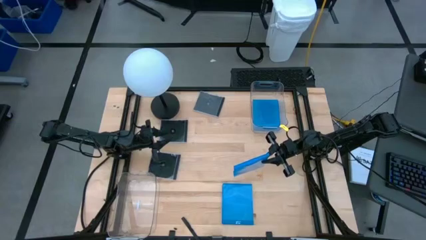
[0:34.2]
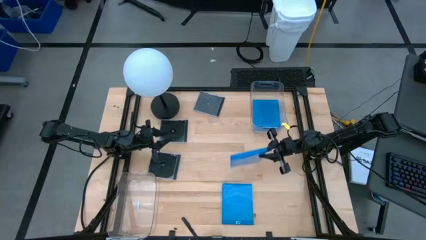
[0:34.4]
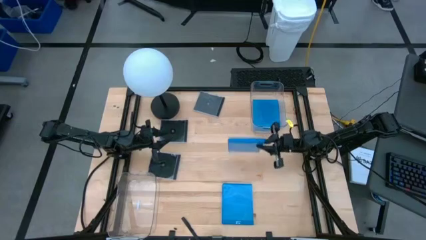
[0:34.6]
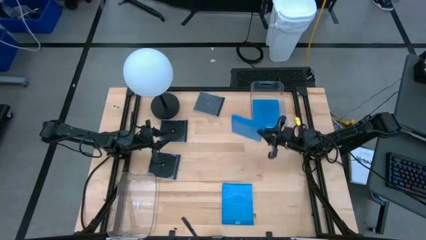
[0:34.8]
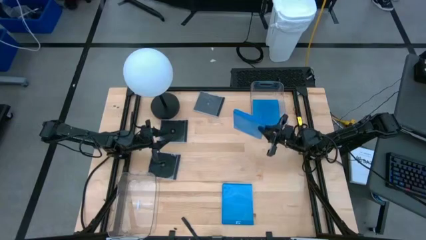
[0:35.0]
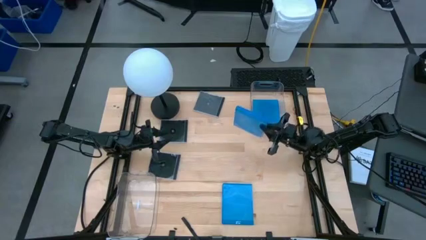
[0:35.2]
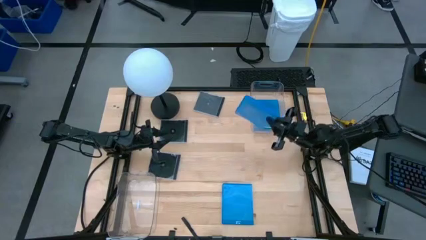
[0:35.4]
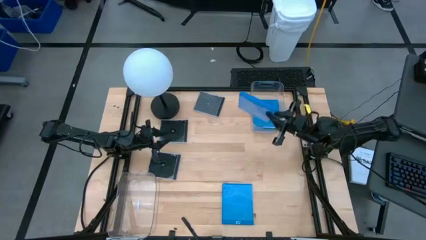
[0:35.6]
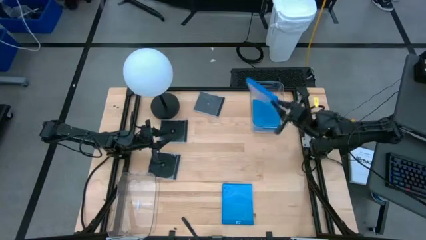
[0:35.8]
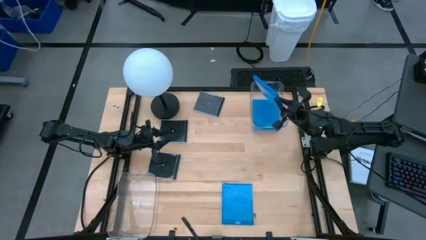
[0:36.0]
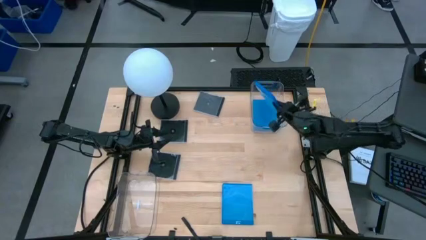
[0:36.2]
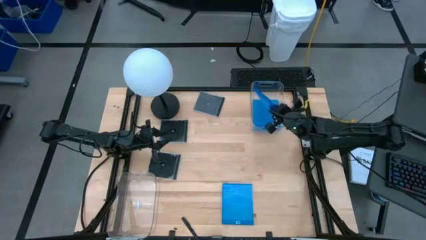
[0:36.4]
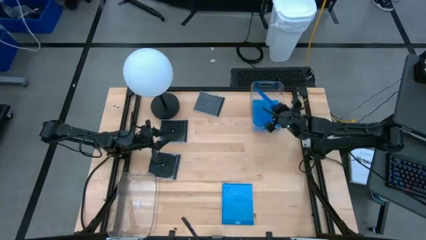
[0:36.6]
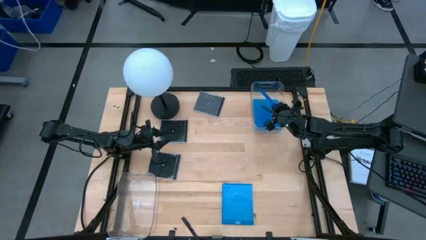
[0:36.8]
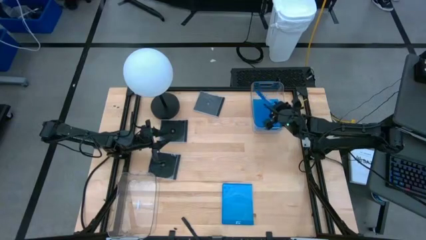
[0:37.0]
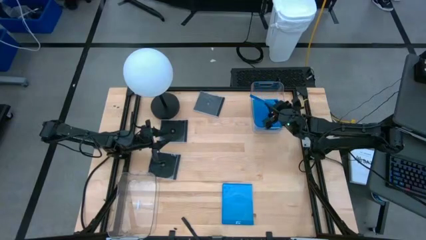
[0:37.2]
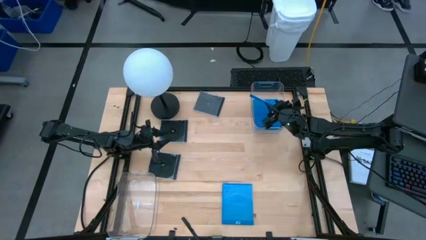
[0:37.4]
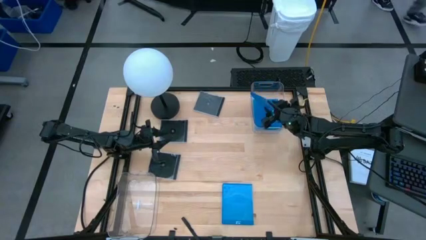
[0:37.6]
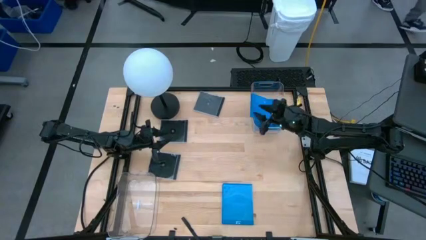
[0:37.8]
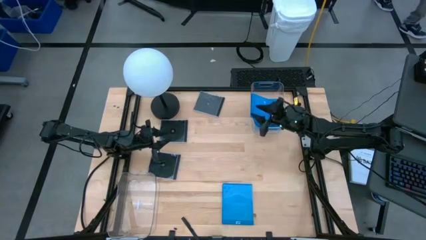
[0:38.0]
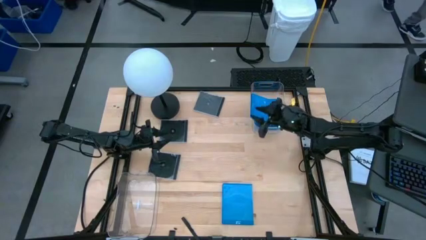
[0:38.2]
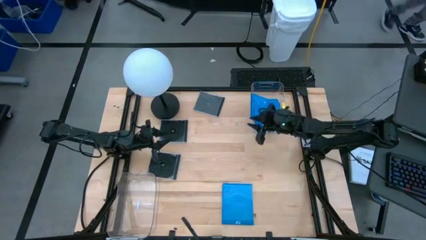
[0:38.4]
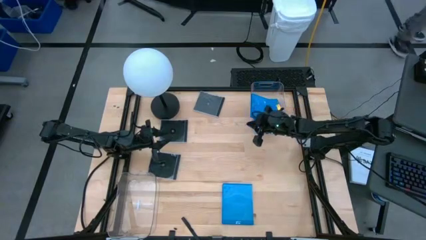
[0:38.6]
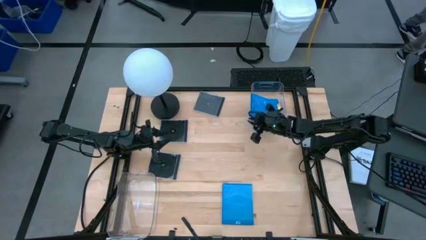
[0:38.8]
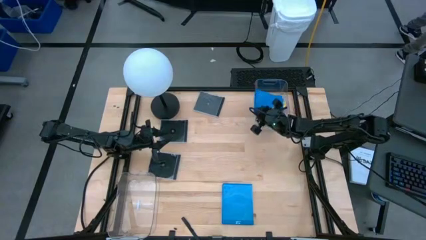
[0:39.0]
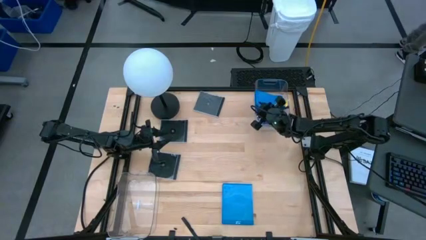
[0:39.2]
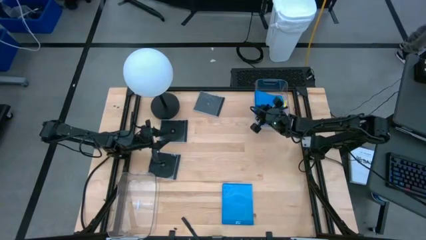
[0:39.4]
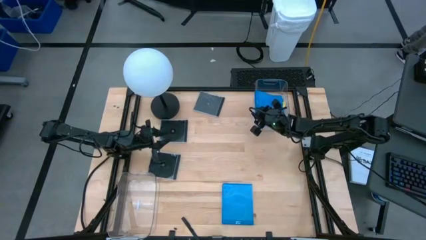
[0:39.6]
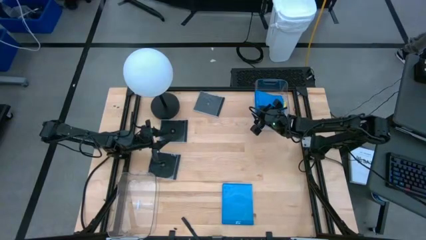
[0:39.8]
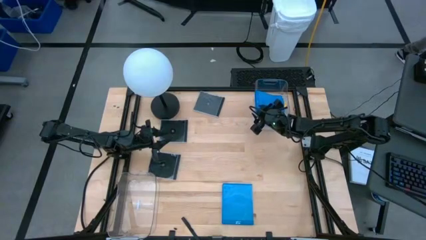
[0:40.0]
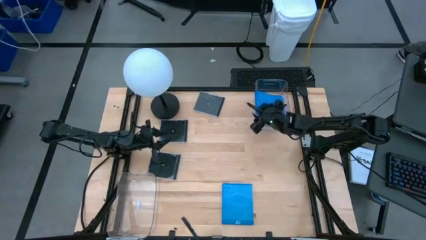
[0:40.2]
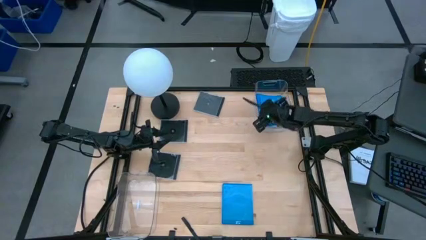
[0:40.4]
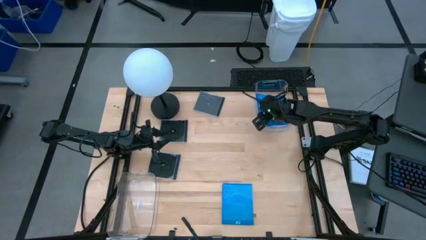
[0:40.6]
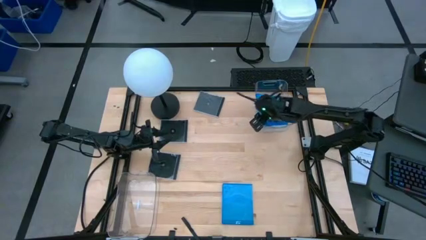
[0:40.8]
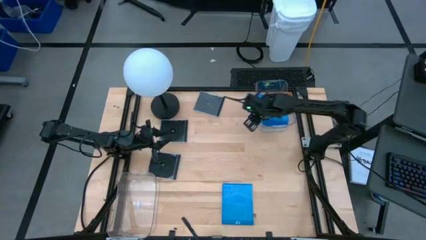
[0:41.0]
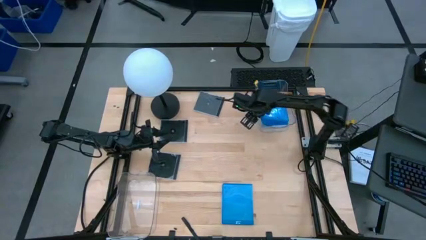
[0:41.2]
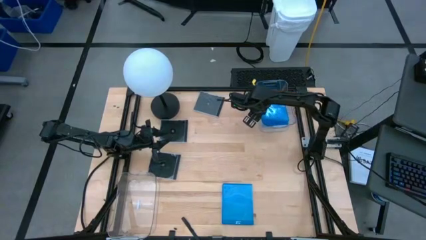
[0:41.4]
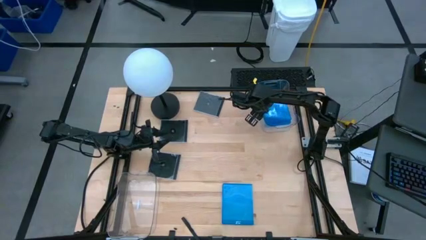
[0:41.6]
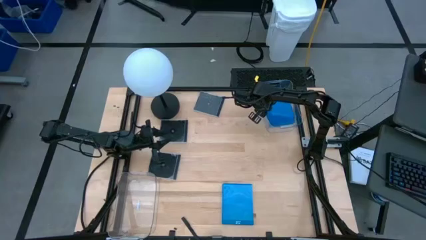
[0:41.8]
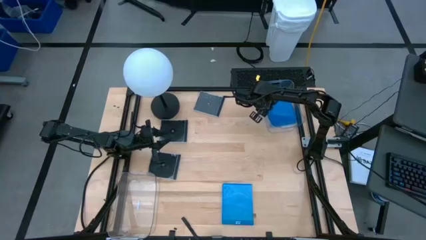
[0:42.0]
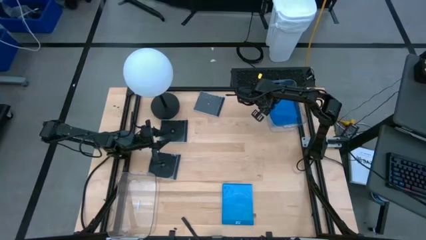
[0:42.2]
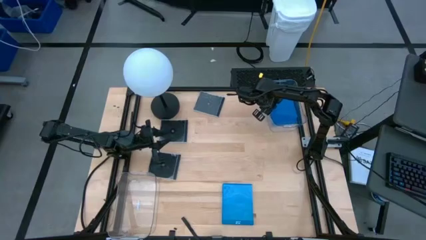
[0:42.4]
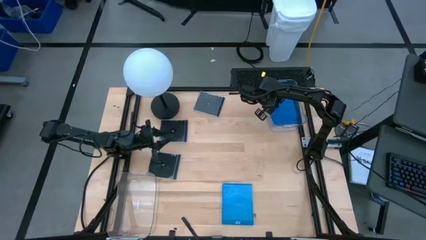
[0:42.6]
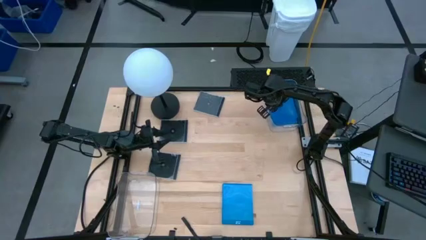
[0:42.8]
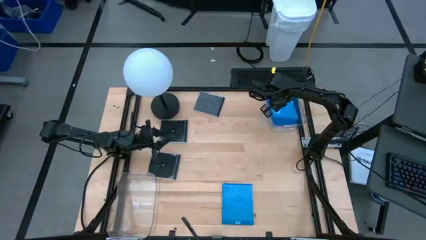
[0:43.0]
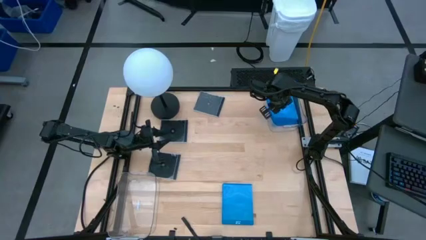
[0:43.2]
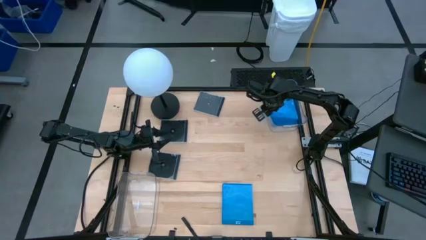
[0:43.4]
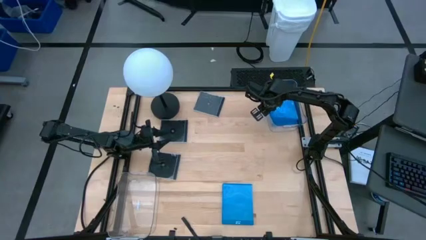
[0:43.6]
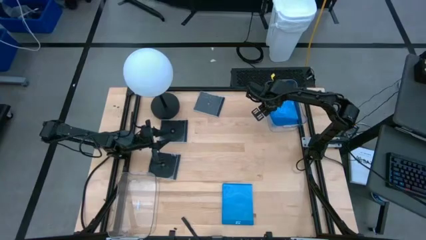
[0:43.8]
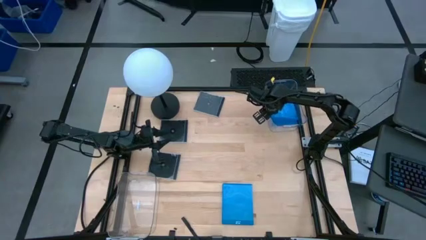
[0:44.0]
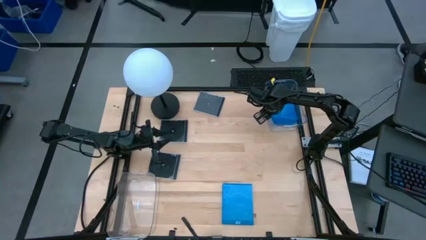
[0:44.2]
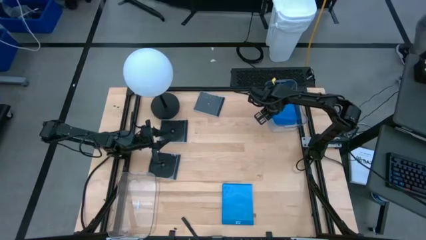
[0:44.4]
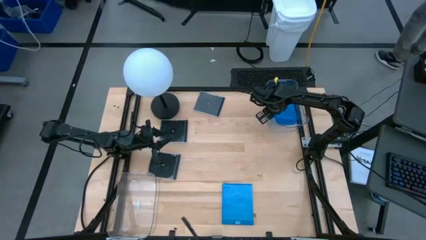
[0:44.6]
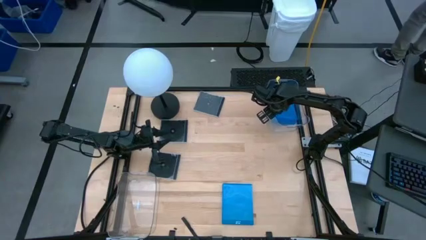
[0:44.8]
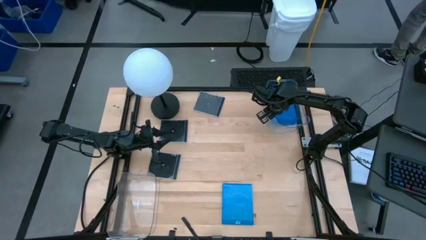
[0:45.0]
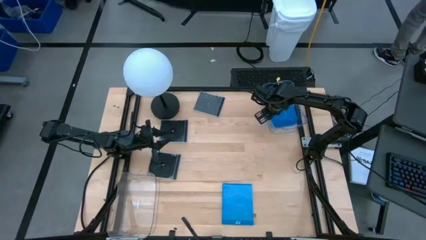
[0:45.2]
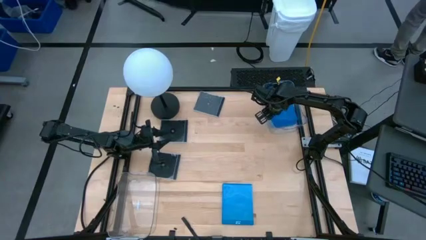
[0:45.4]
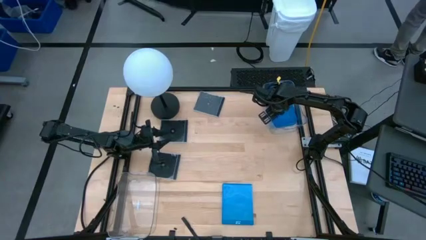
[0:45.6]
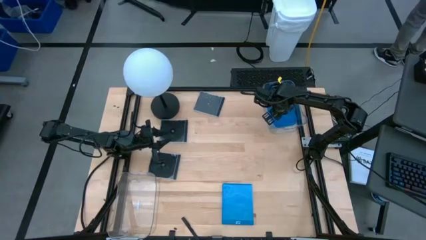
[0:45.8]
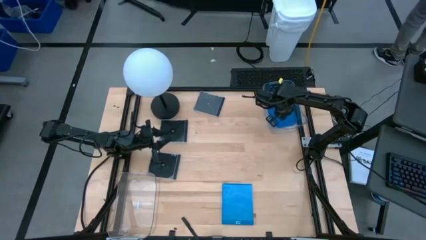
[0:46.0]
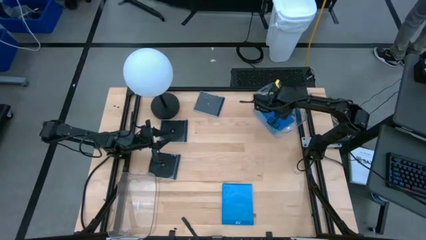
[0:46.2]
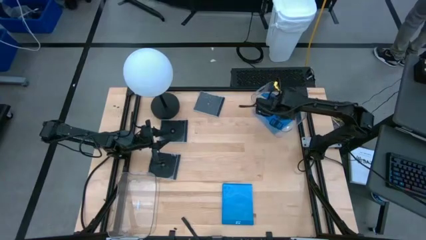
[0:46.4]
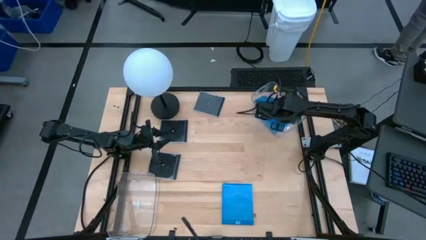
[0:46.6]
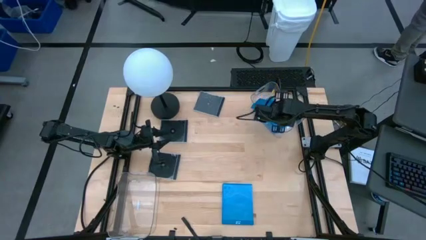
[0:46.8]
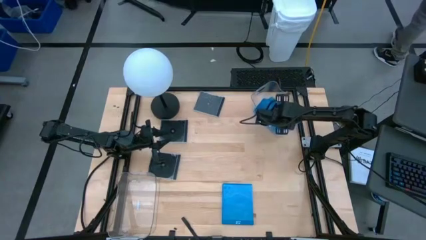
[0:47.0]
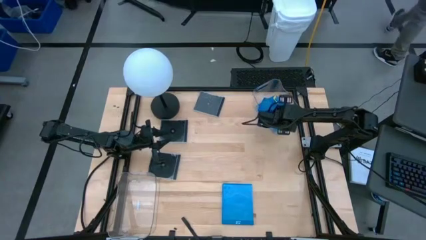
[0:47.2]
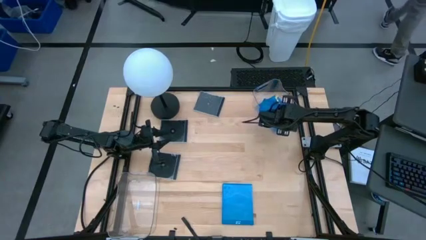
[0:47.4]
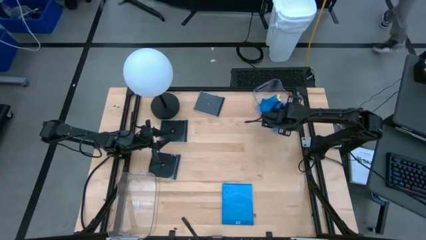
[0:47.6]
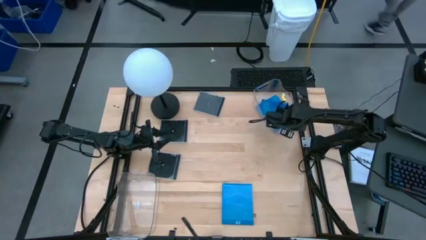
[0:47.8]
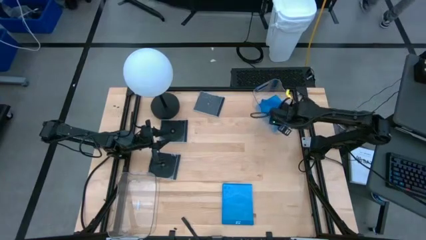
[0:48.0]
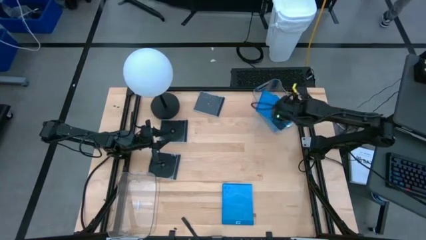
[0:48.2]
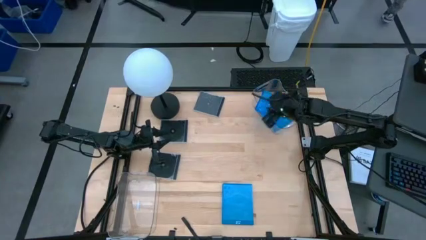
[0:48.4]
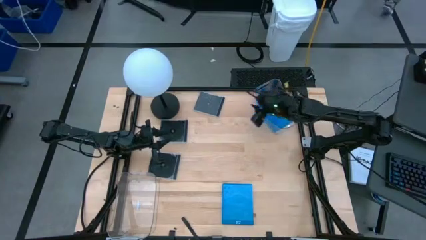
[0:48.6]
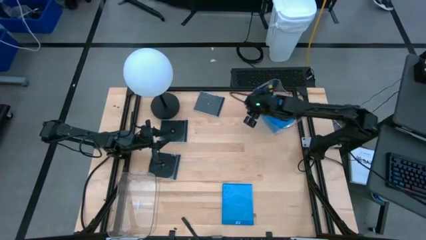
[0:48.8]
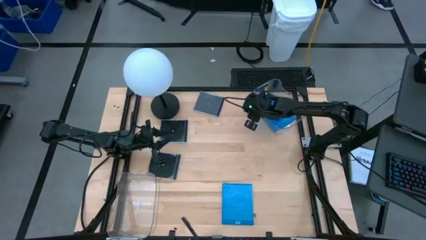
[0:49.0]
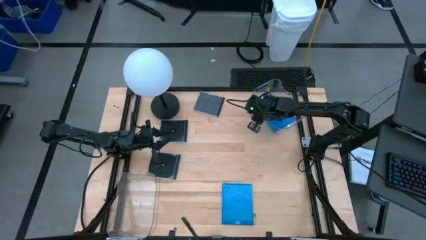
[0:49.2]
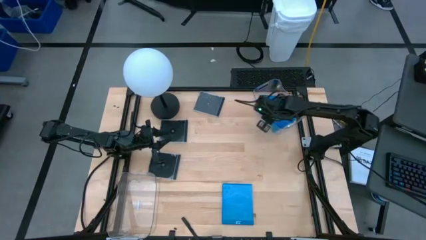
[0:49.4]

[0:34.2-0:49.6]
Task: Pick & place jewel cases by type
Put the top blue CD case into the top transparent bin

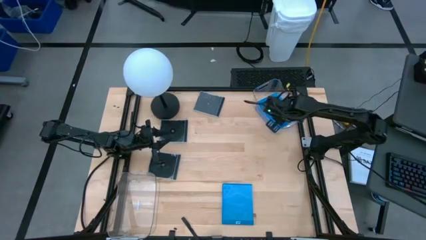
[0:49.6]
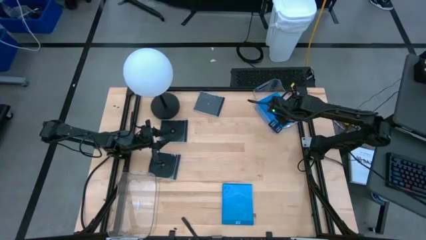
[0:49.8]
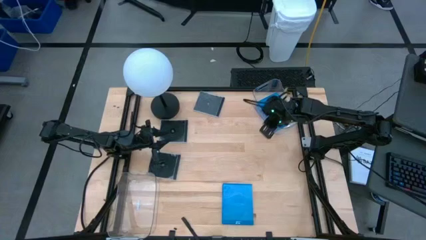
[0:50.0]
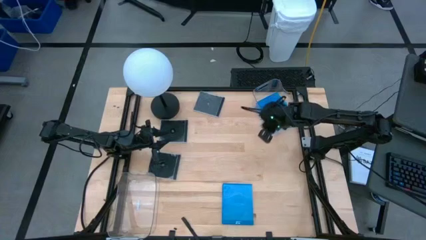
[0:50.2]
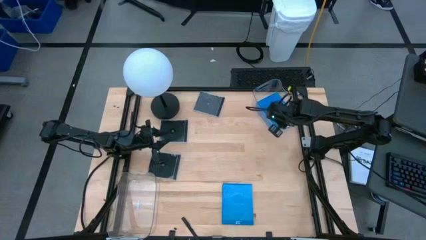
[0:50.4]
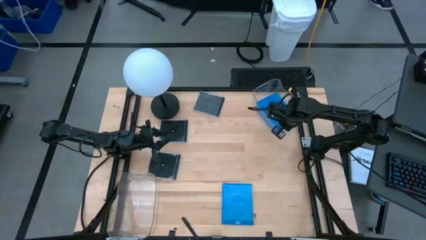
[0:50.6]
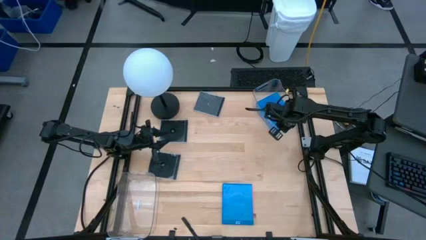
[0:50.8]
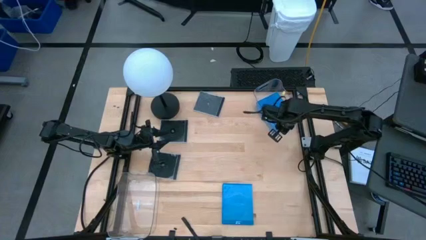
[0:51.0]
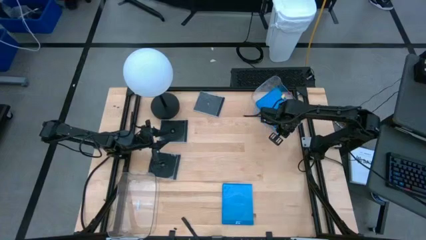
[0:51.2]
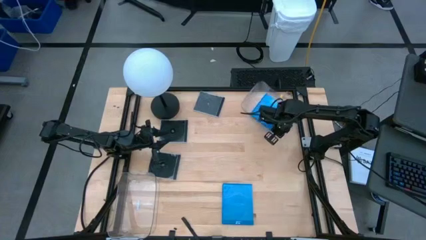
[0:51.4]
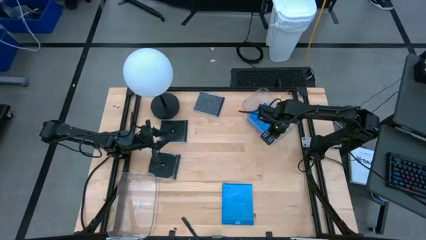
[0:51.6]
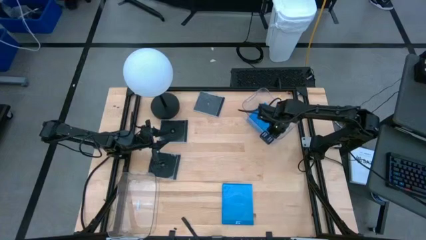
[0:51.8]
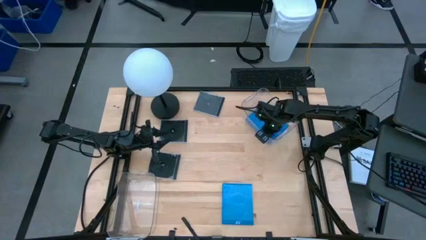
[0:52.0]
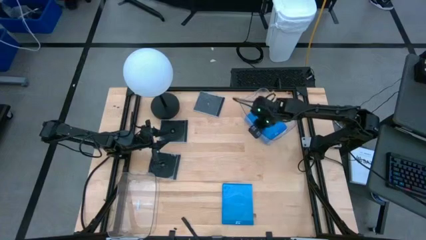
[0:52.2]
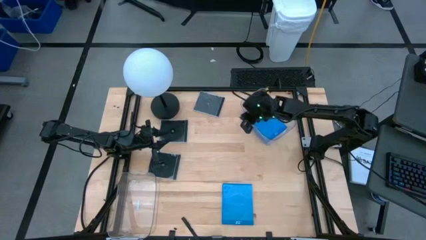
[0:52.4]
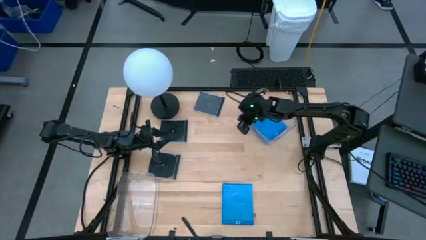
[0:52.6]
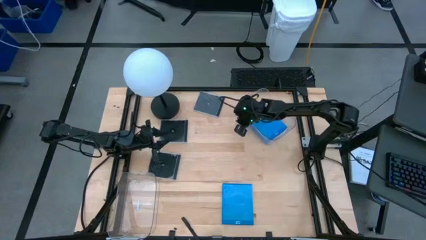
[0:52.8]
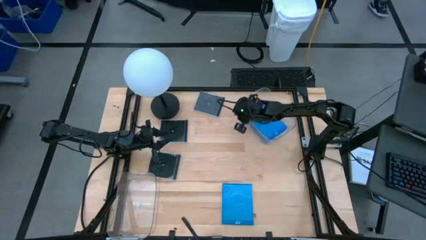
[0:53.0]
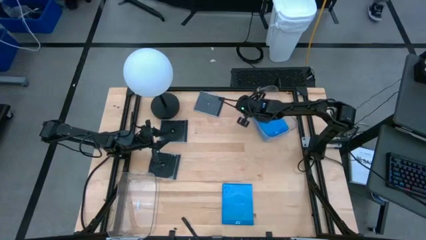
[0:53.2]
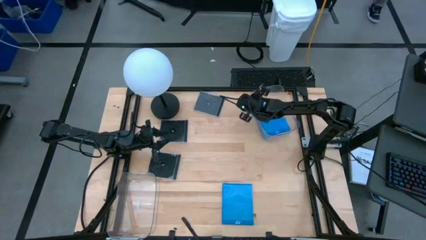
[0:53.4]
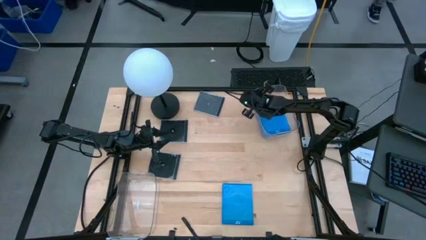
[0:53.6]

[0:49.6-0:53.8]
Adjust the top transparent bin
